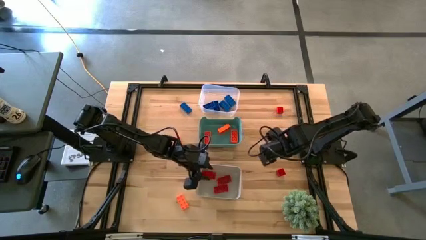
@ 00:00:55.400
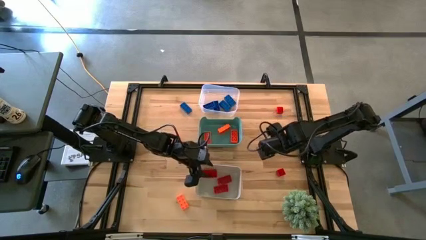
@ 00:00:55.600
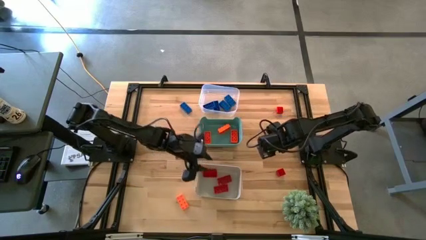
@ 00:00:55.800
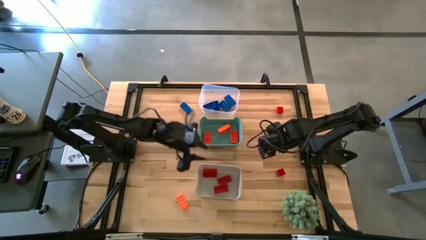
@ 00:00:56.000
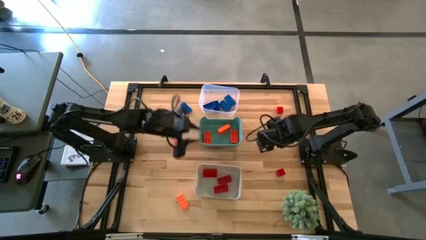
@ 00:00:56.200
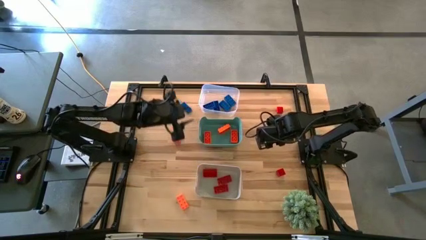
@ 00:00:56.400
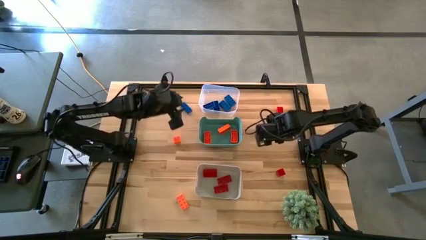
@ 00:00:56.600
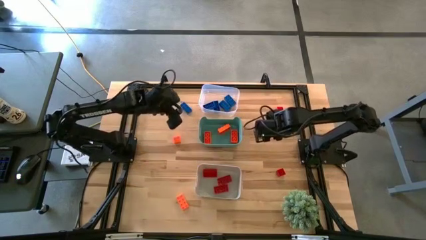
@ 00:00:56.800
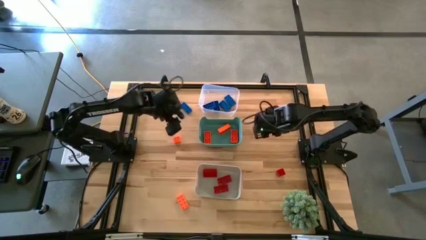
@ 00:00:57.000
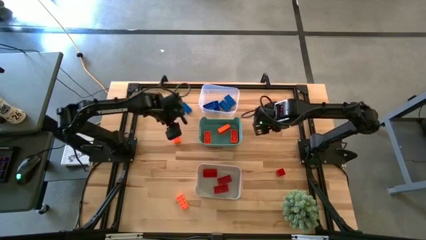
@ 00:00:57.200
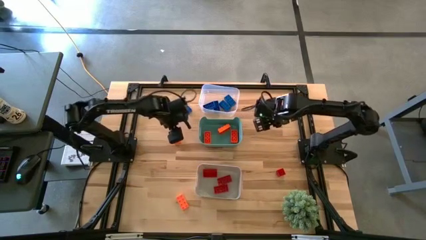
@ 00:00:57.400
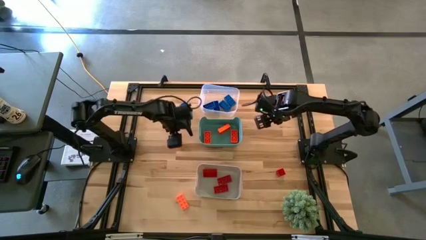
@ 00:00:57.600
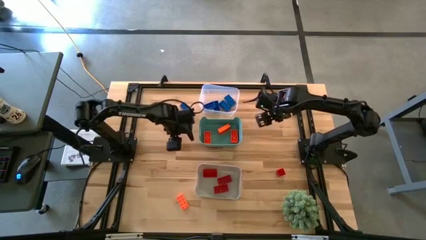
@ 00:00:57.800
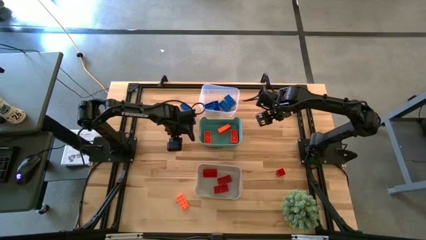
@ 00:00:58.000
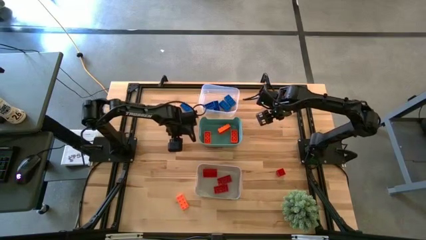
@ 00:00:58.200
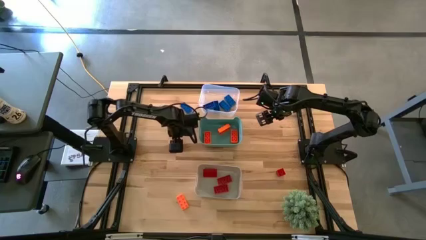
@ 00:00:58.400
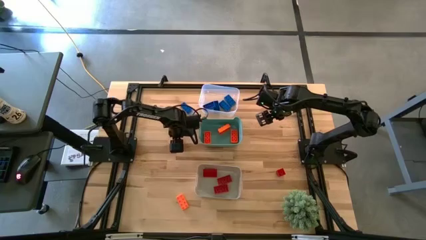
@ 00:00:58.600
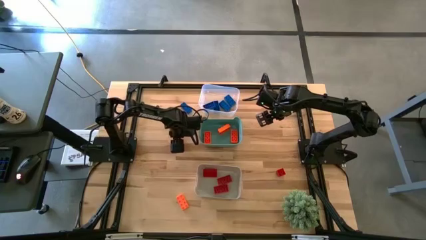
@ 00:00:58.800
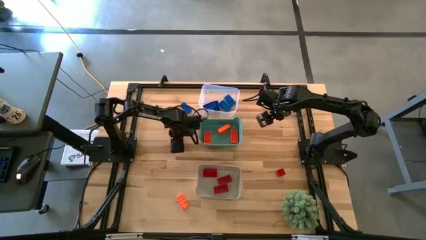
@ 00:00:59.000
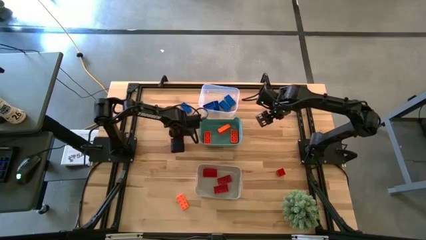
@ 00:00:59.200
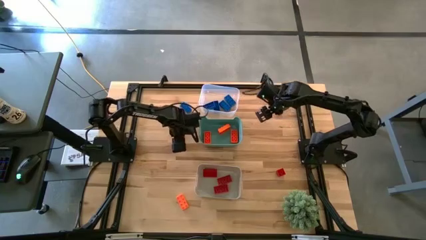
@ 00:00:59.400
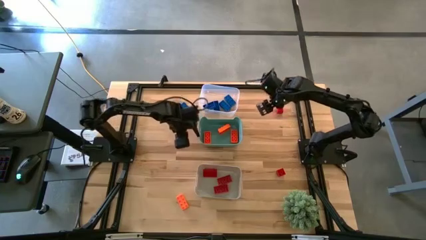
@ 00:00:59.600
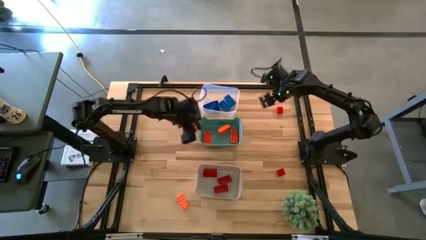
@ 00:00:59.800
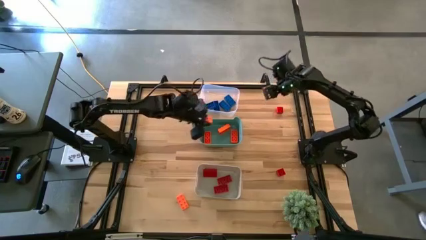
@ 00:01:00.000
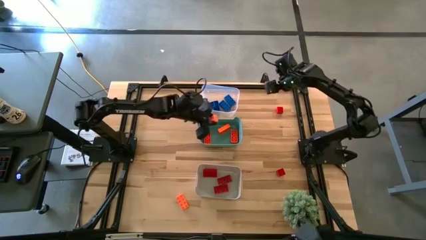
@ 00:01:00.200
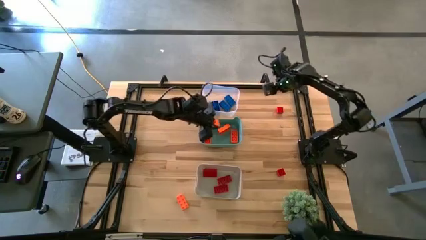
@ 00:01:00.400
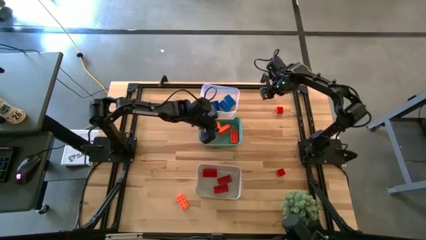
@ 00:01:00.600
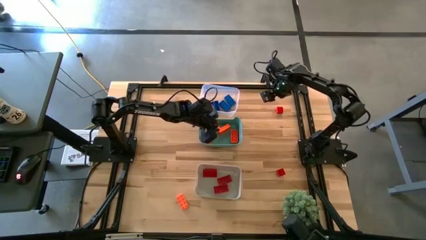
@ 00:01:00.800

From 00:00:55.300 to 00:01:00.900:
Task: Sort & place blocks by color
Put the orange game piece into the green bin

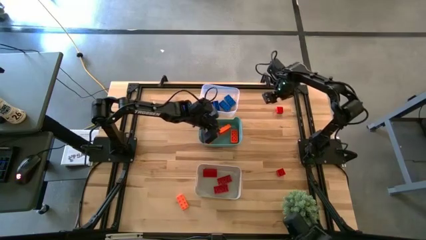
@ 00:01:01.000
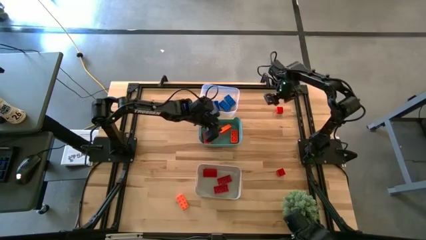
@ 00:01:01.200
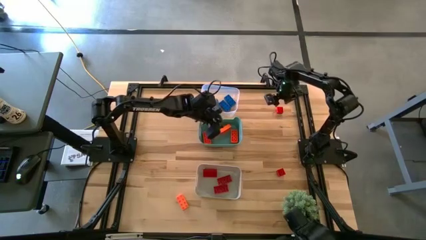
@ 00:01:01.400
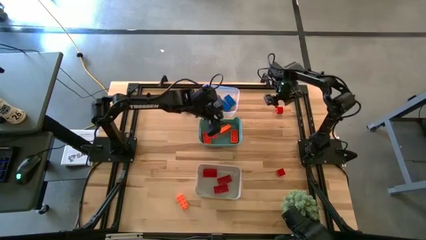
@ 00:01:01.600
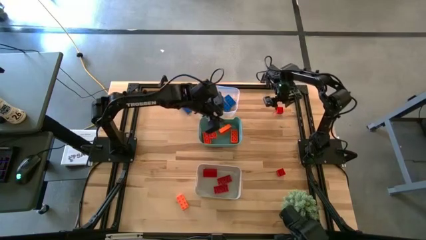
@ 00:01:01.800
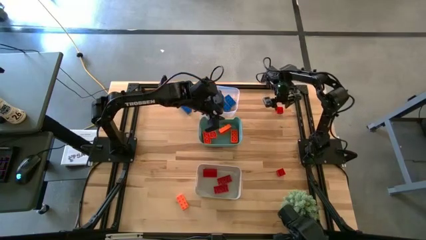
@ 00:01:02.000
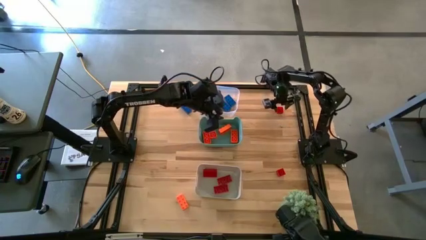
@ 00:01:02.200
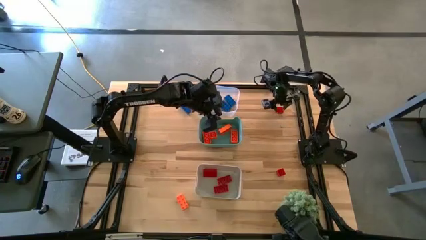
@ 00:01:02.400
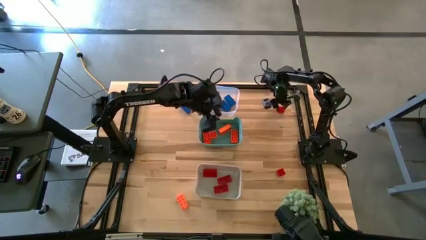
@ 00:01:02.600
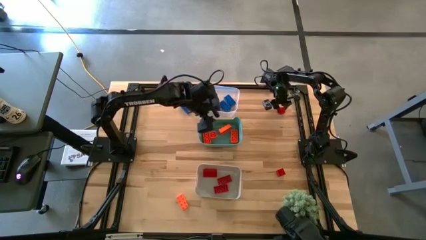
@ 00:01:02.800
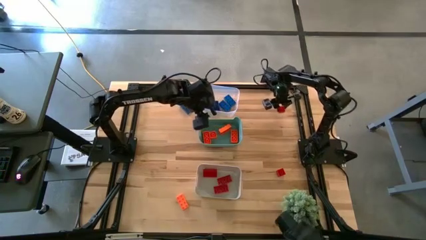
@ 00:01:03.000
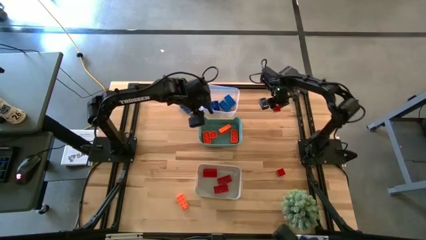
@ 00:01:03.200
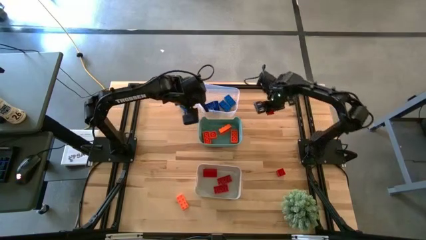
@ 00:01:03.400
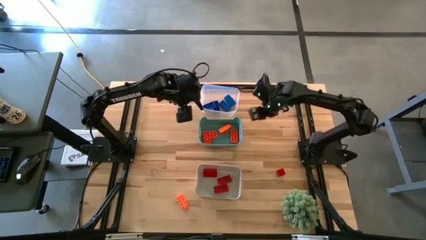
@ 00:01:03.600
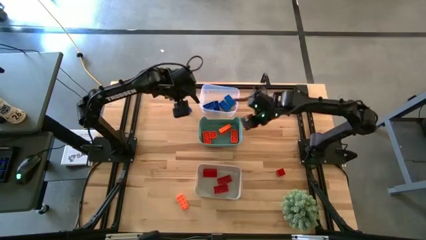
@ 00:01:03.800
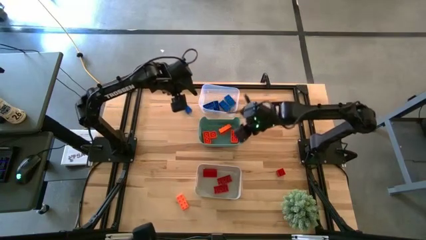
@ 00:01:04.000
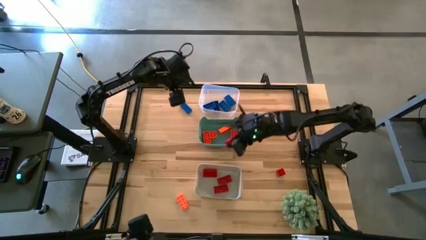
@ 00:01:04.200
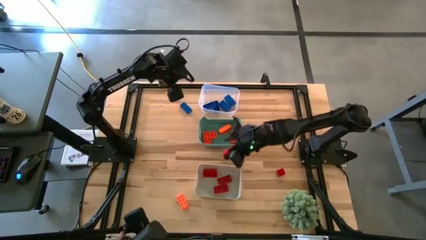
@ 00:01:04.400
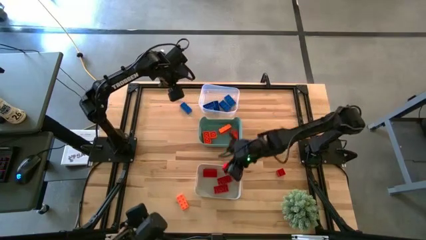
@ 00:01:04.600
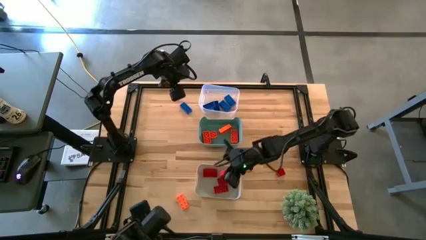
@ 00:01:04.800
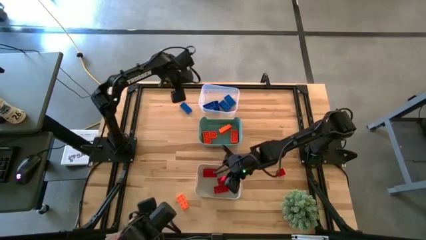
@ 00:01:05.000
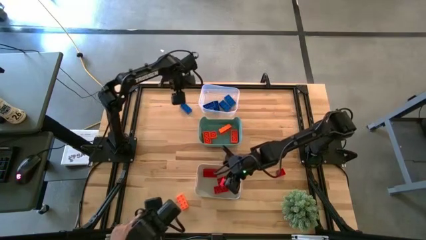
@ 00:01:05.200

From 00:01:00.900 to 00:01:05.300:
Put the red game piece into the white bin

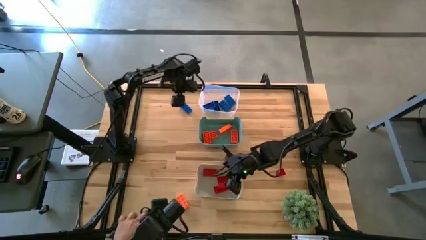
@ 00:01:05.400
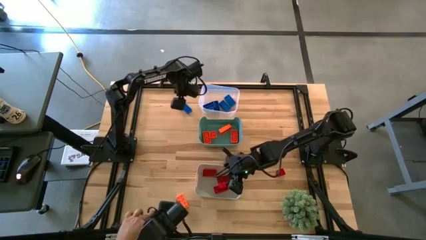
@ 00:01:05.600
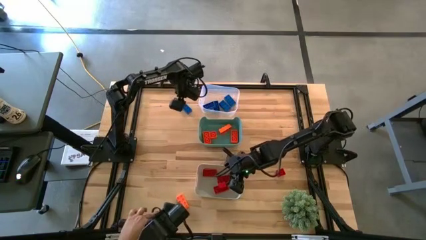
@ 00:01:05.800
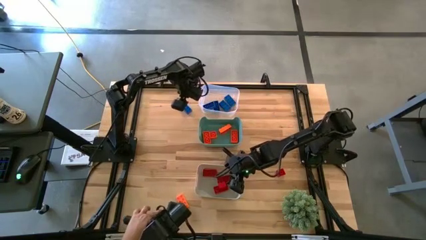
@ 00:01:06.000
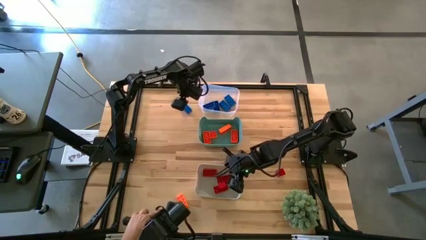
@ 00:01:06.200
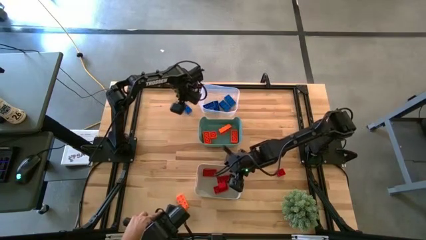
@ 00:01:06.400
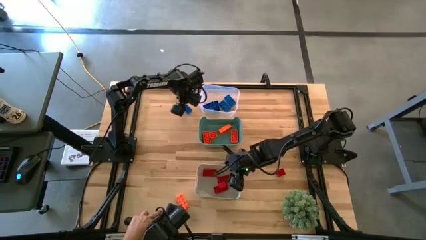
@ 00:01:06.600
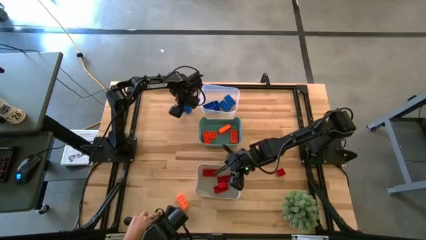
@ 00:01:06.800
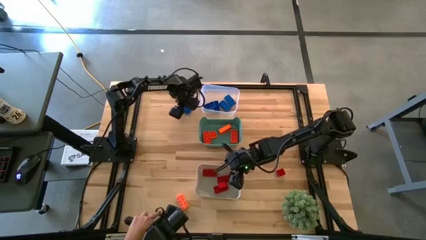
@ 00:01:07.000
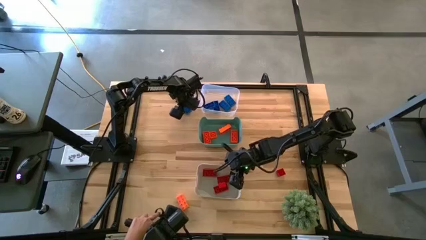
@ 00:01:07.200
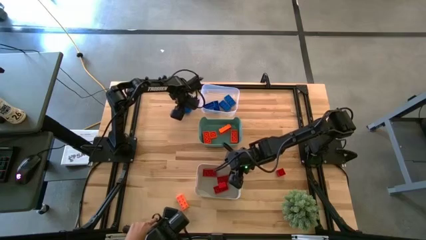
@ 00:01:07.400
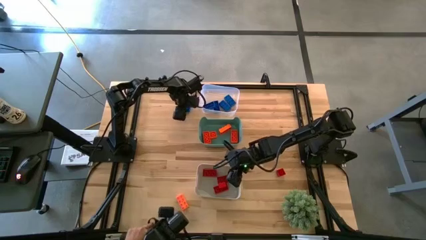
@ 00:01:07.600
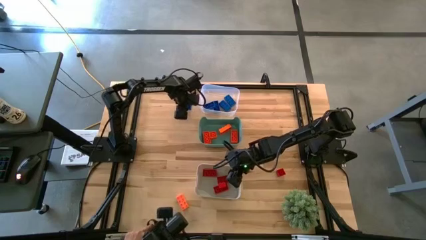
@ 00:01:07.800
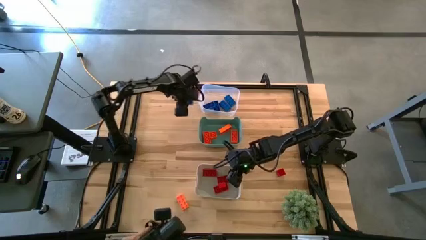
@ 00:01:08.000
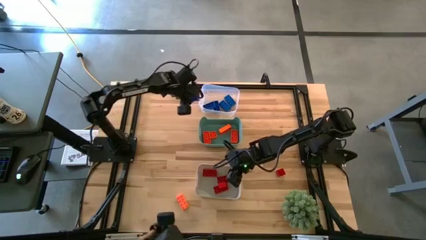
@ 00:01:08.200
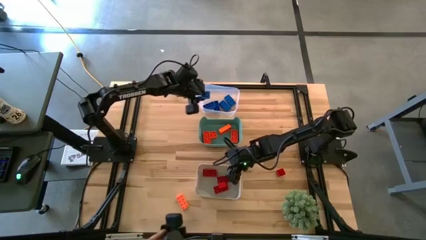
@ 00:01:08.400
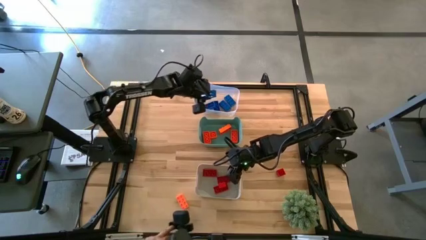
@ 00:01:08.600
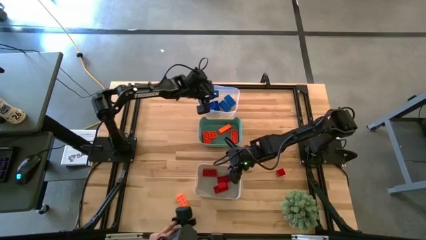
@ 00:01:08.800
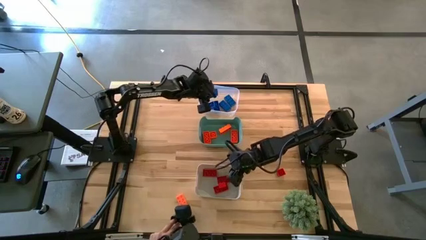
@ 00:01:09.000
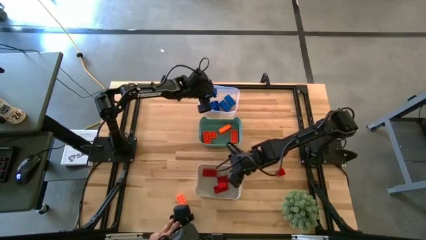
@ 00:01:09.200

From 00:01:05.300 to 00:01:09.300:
Put the blue game piece into the transparent bin

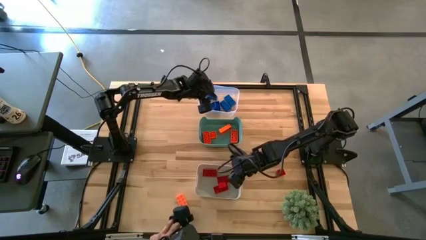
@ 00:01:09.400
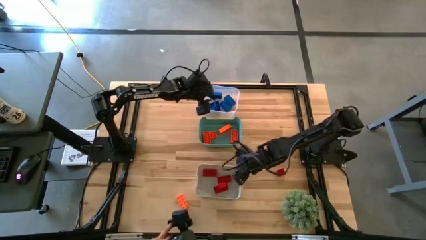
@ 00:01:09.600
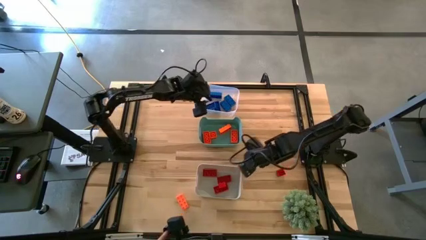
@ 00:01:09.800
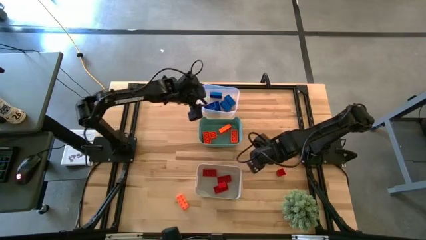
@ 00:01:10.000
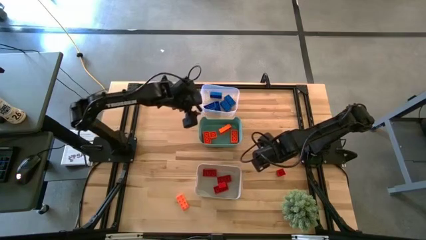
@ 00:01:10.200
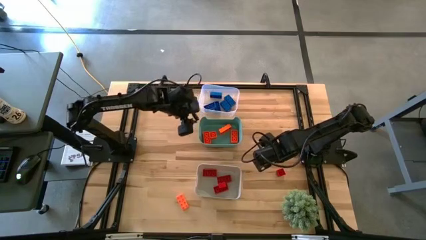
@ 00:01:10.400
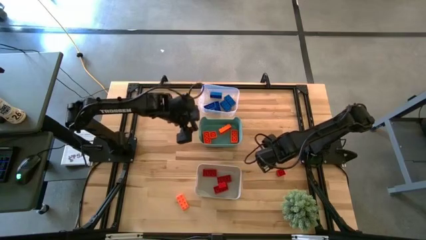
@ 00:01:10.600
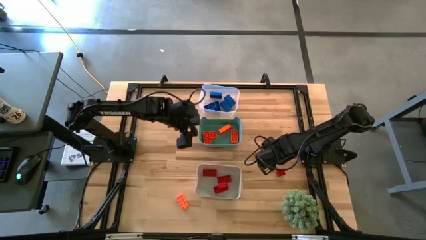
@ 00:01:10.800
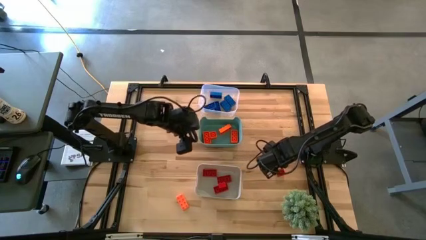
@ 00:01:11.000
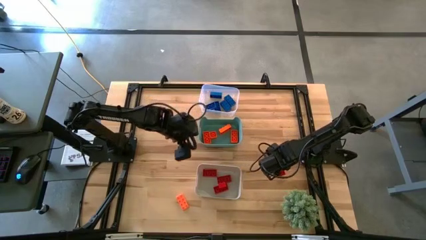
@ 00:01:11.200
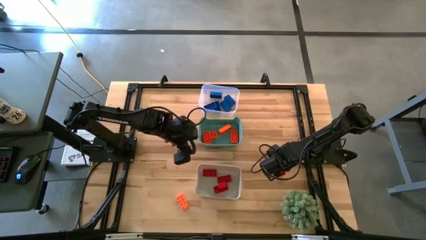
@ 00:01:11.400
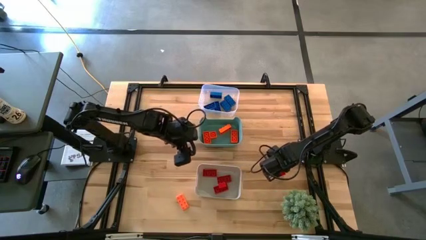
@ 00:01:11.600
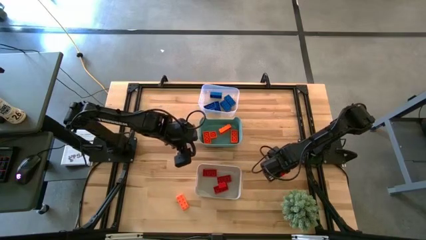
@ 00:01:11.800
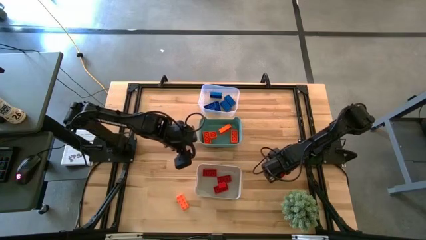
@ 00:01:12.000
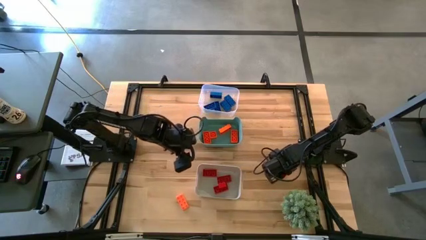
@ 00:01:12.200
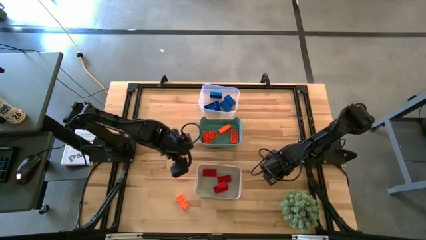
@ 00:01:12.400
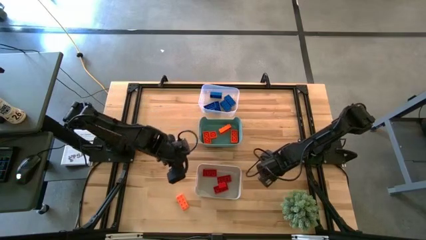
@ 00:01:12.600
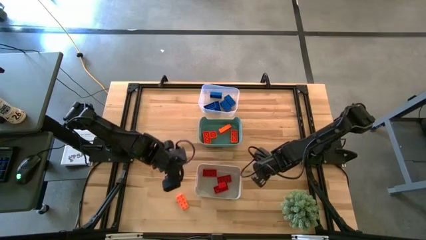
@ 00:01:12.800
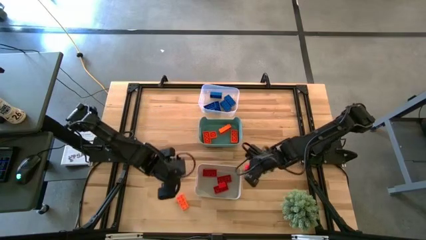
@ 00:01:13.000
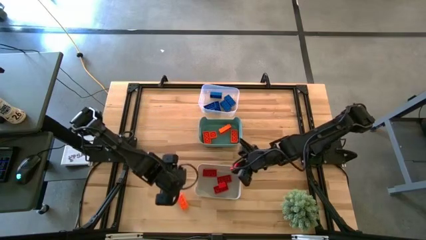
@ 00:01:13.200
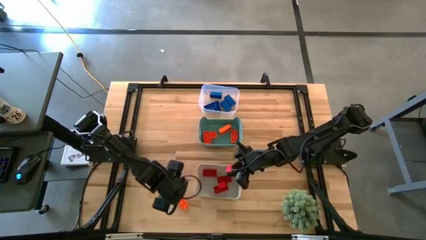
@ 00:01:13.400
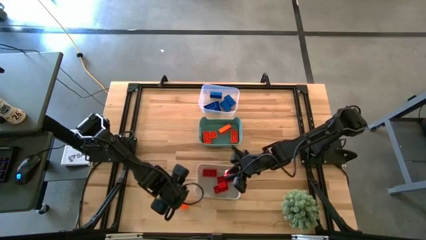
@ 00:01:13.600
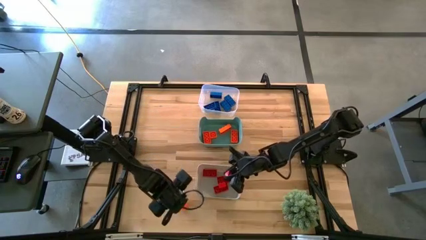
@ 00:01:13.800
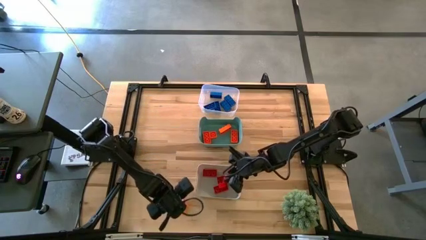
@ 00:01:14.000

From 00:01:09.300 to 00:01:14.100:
Put the red game piece into the white bin
